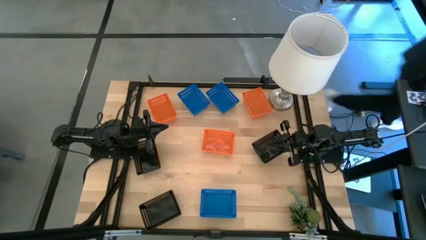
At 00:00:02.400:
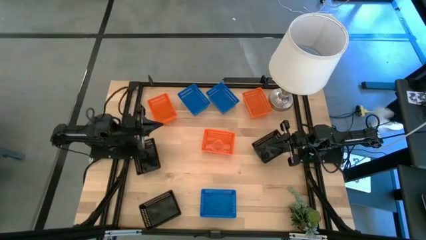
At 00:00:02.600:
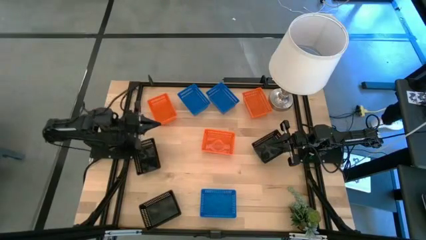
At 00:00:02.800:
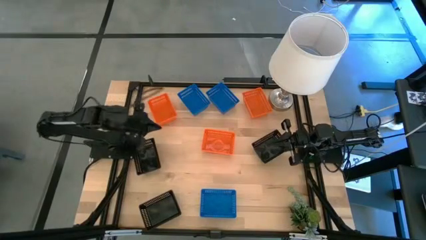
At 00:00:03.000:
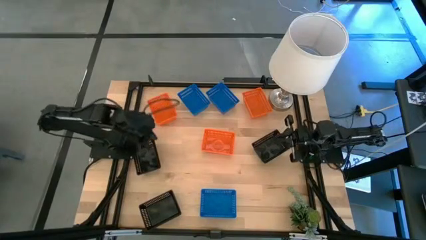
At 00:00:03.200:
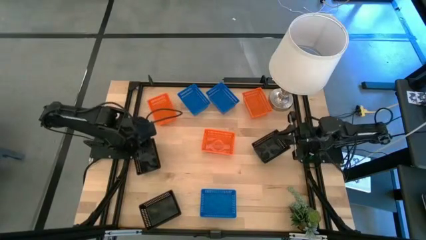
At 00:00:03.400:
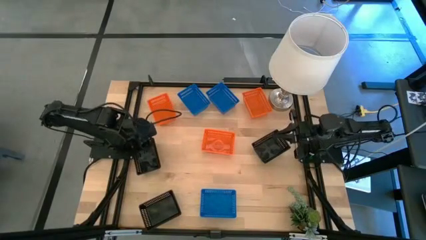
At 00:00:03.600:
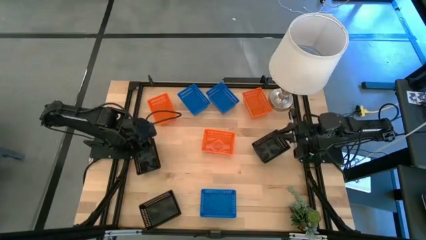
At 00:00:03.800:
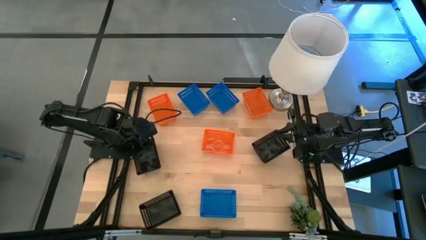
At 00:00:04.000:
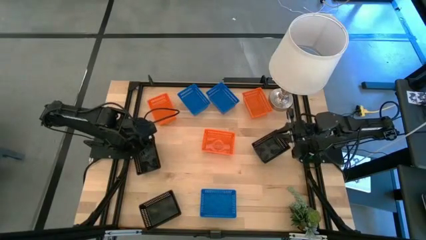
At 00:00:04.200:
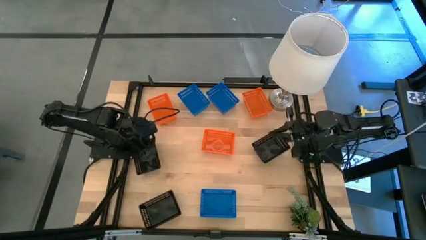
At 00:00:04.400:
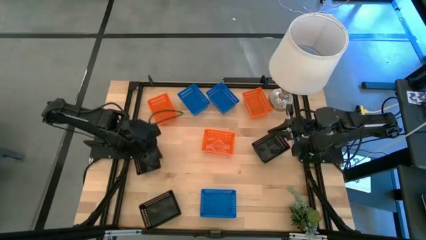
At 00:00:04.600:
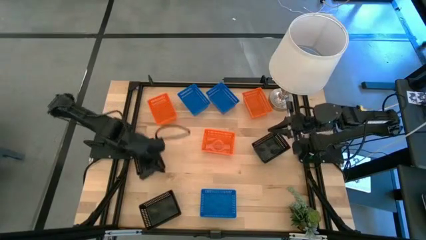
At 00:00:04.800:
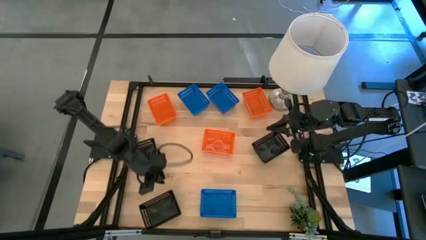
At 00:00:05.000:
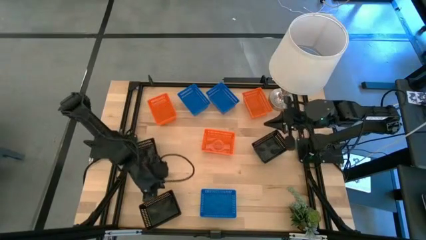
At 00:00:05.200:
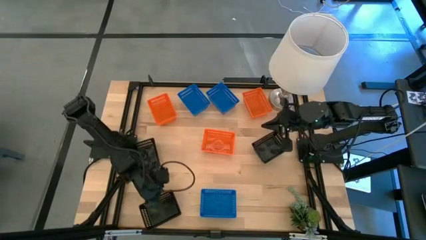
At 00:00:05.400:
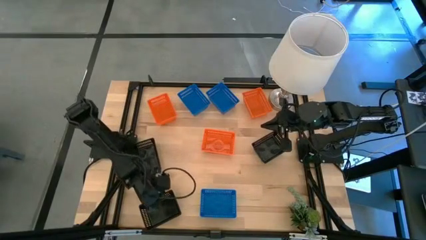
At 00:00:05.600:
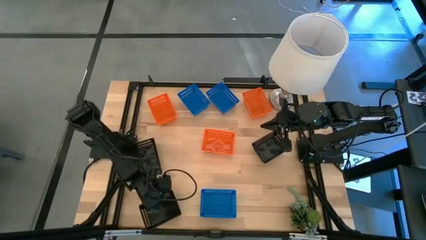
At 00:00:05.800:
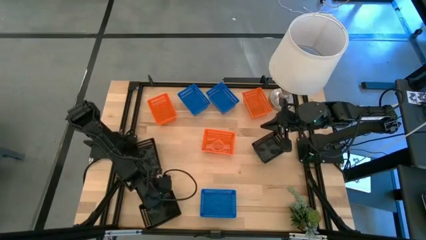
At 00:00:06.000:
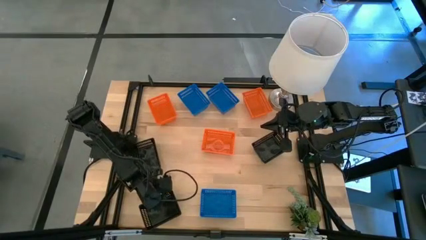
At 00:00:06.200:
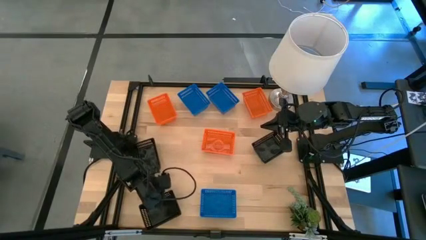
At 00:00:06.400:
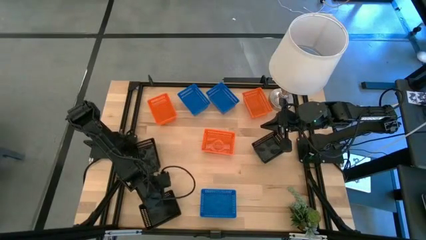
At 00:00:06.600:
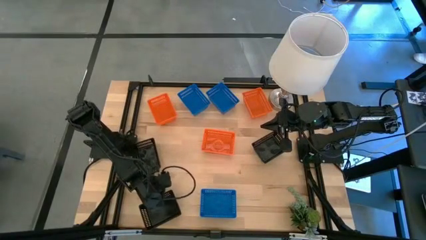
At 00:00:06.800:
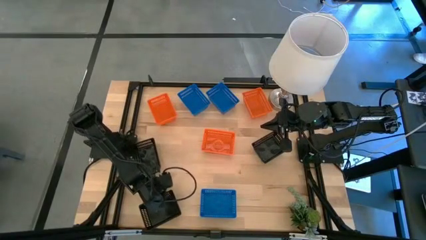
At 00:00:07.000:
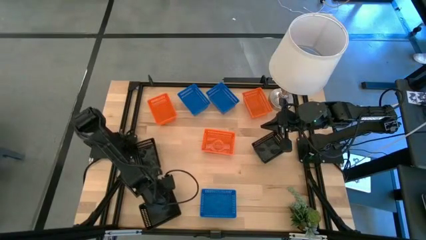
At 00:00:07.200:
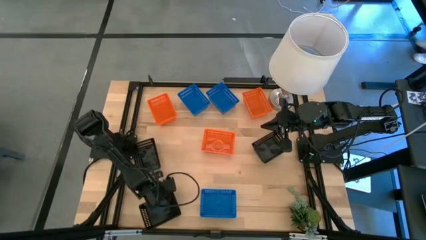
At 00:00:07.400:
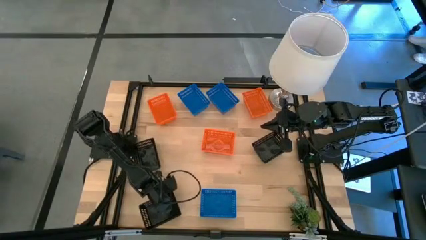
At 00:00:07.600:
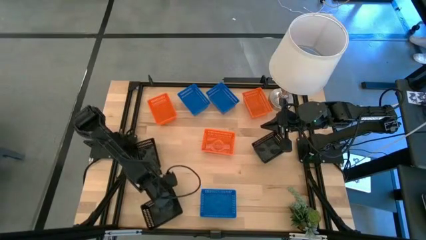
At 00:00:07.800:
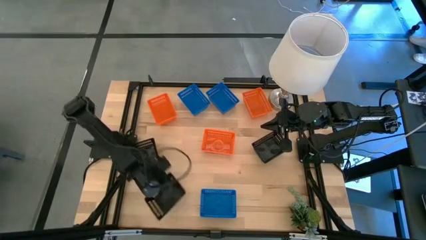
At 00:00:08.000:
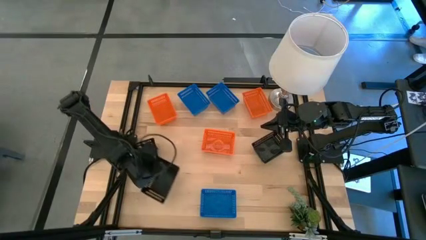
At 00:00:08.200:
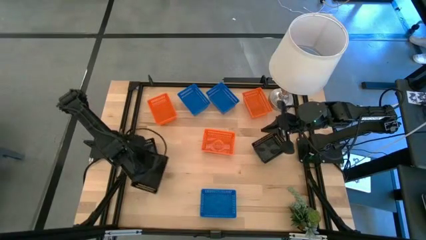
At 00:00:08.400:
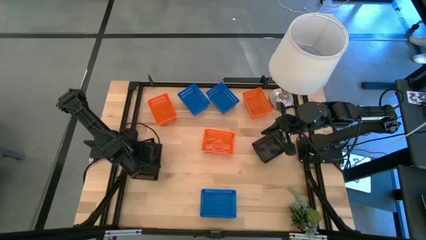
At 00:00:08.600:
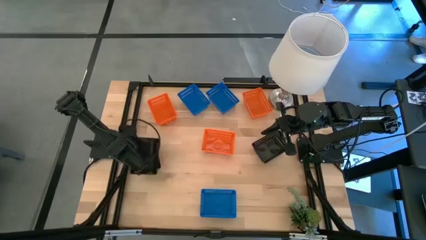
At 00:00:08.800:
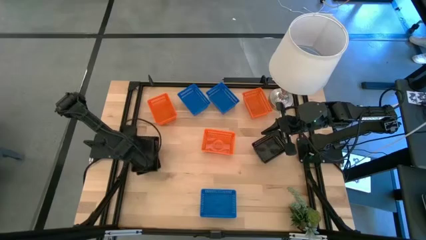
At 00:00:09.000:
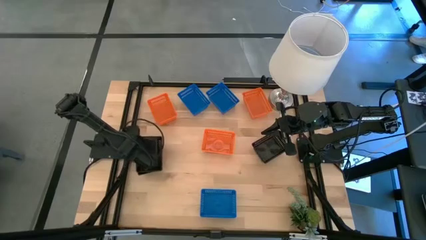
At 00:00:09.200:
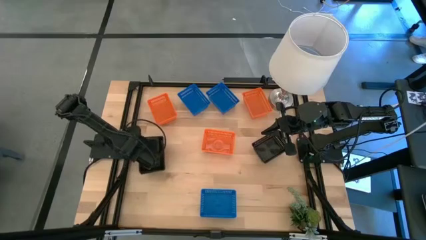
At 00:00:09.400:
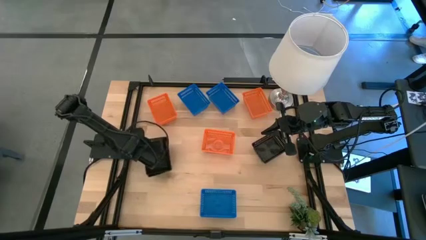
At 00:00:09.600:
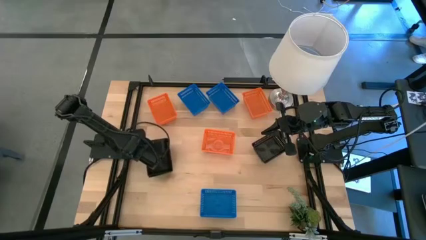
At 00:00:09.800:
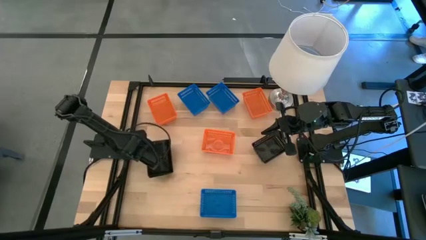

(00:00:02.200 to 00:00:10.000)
Stack the bottom left black basket bin on top of the top left black basket

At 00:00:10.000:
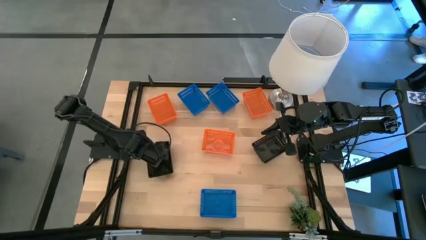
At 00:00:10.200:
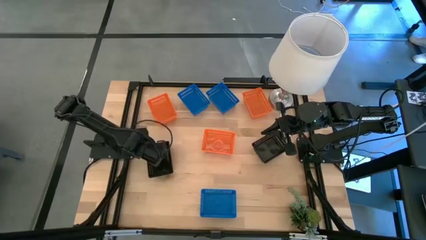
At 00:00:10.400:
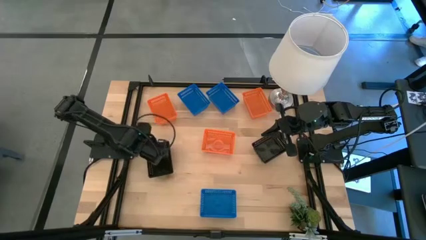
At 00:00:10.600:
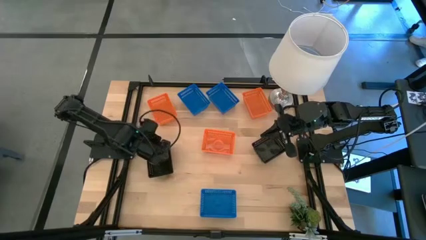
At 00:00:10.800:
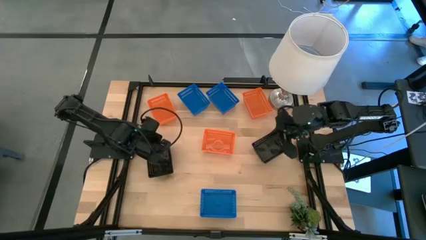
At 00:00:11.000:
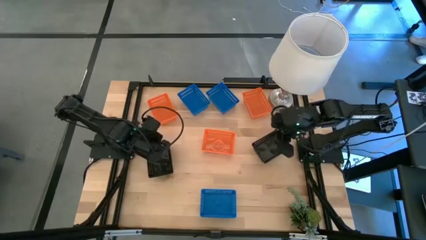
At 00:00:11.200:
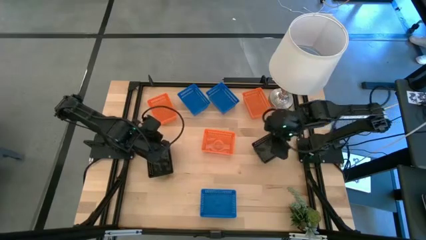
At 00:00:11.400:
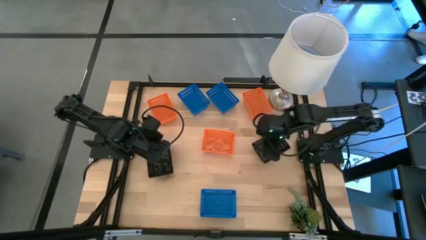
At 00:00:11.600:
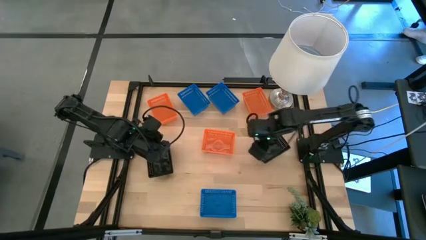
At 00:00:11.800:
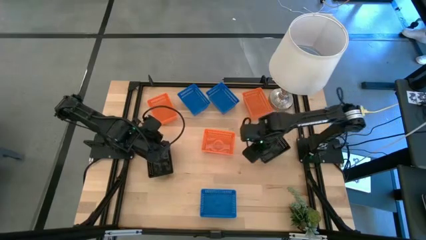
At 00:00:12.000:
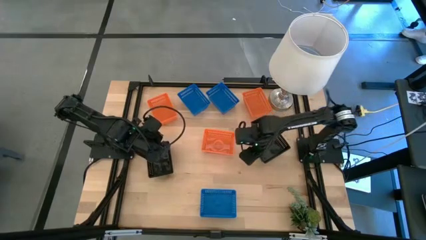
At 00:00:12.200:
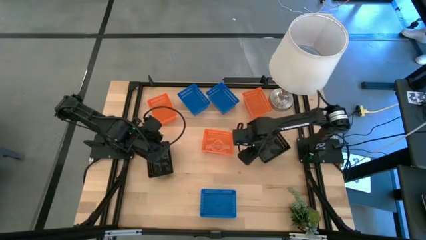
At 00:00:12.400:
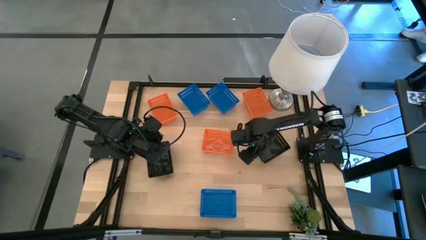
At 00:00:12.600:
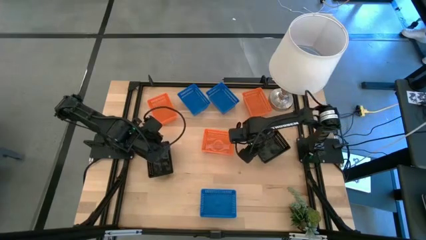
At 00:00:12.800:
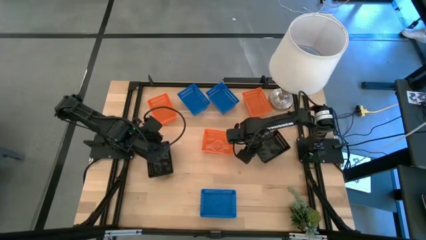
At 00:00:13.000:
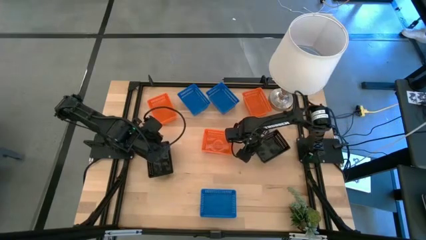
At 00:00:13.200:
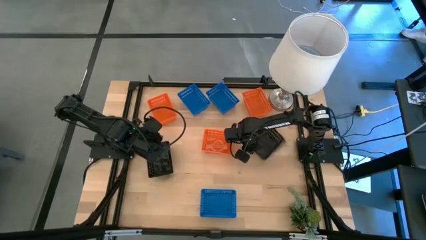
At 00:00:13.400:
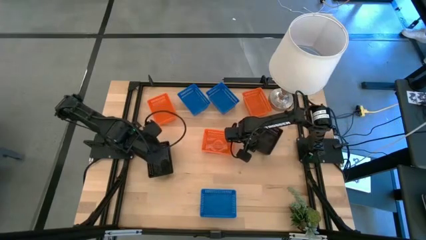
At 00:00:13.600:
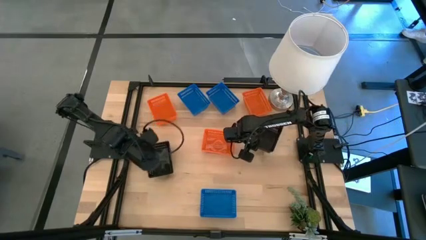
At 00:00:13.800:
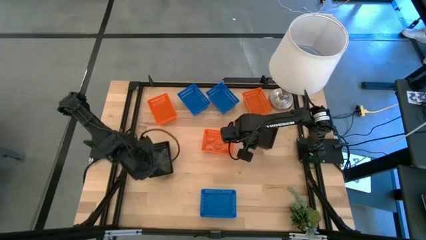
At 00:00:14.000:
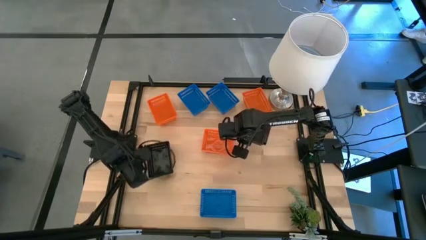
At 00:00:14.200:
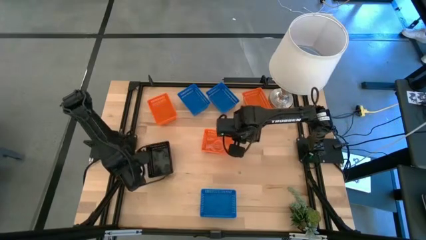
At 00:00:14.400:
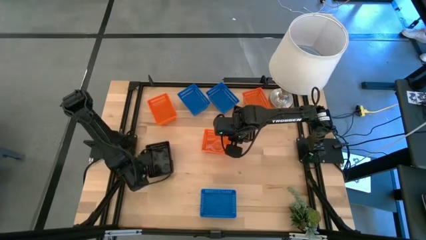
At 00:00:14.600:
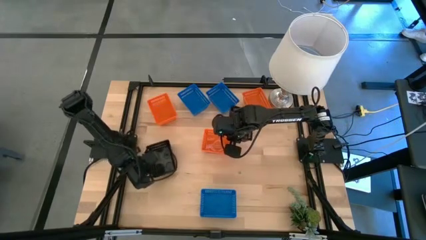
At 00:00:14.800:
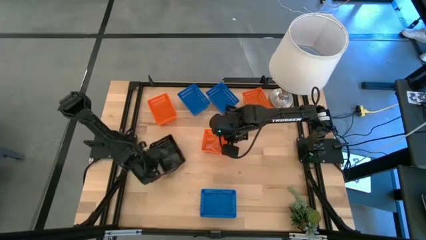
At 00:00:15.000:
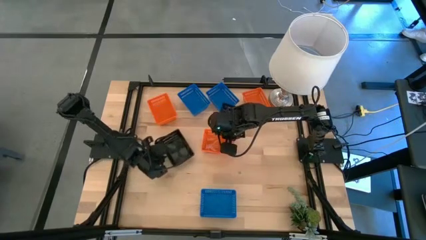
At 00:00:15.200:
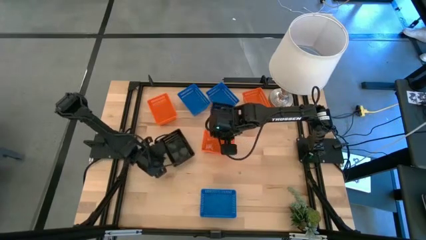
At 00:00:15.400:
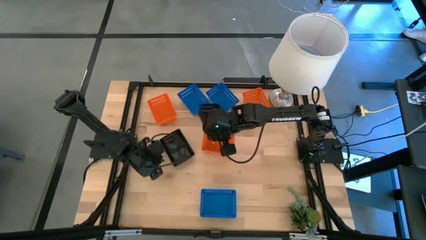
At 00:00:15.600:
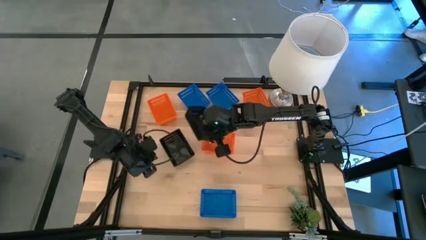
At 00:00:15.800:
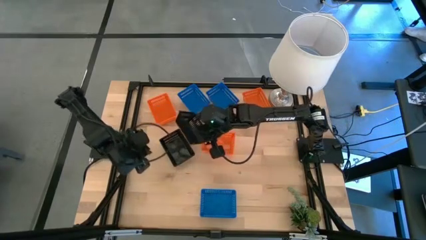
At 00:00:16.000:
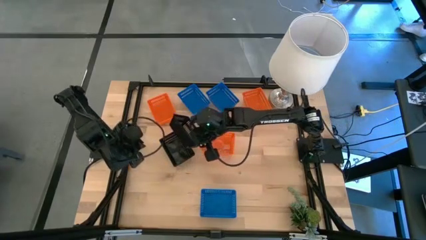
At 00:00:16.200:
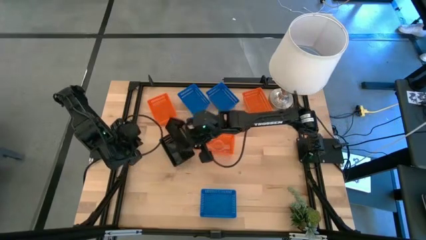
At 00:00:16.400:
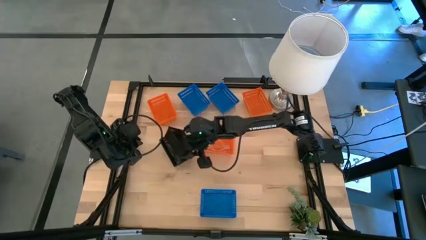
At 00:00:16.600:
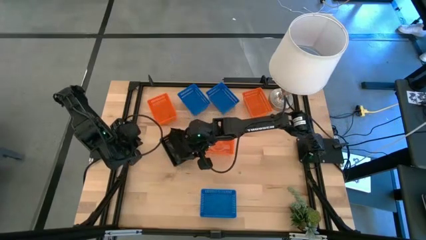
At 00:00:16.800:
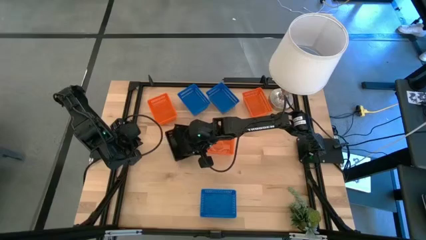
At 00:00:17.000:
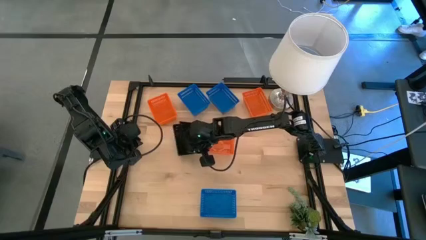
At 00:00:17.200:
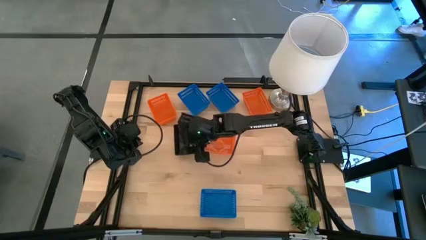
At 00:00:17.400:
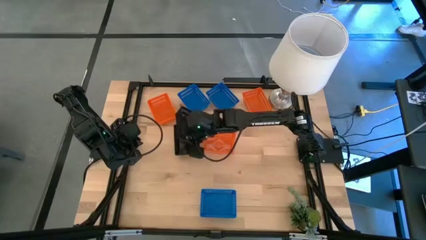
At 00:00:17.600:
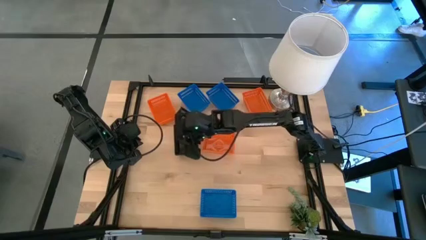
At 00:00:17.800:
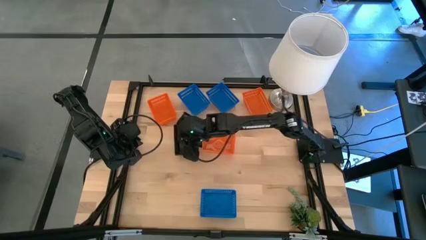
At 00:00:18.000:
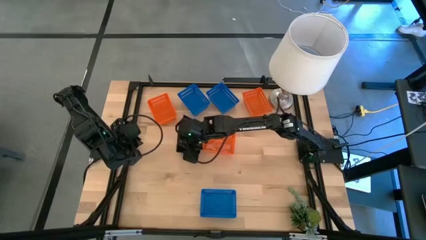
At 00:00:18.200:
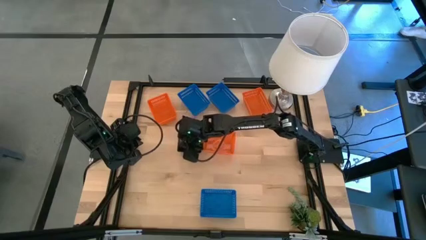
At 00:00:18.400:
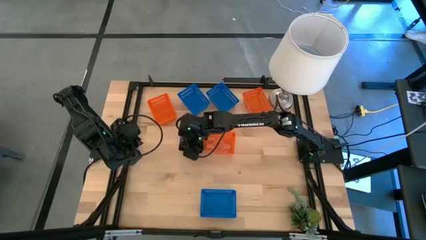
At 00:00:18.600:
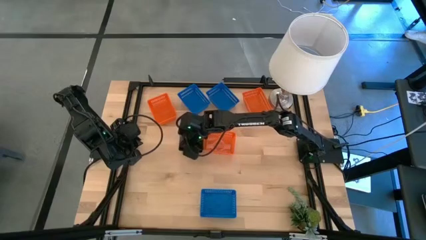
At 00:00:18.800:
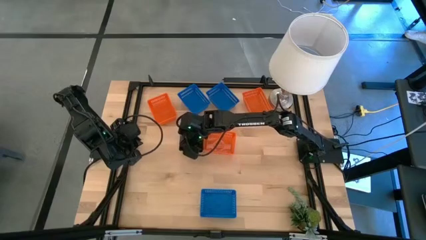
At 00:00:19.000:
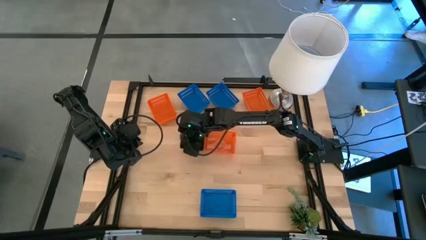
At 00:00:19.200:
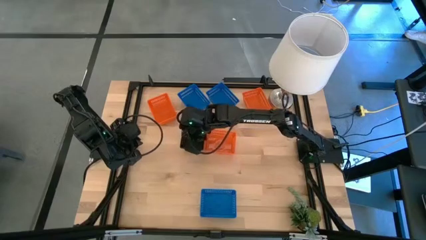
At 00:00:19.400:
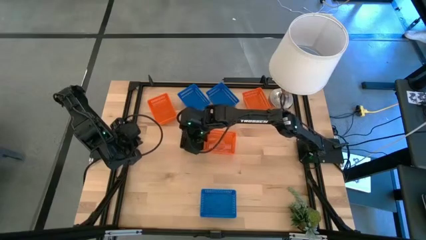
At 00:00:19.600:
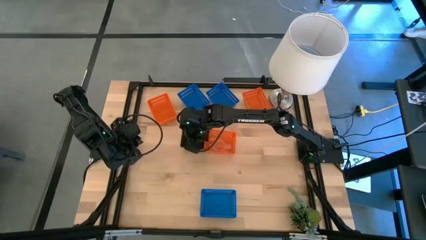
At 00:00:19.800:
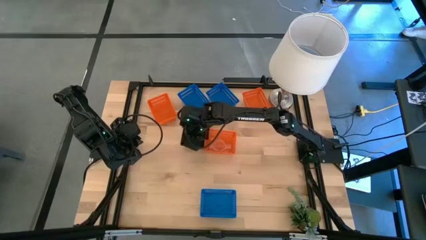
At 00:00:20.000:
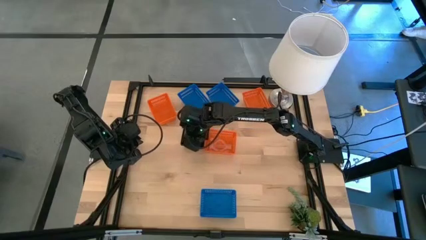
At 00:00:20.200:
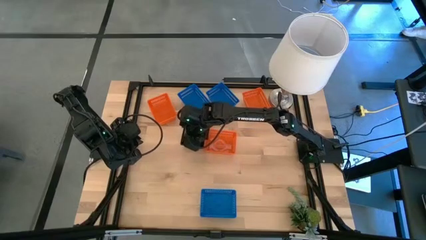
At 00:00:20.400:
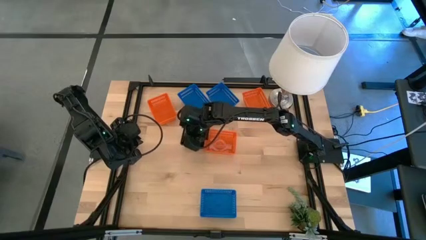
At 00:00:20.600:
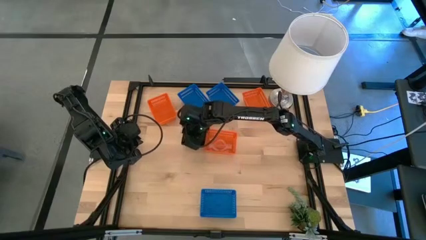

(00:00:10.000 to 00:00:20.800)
Stack the right black basket on top of the left black basket
